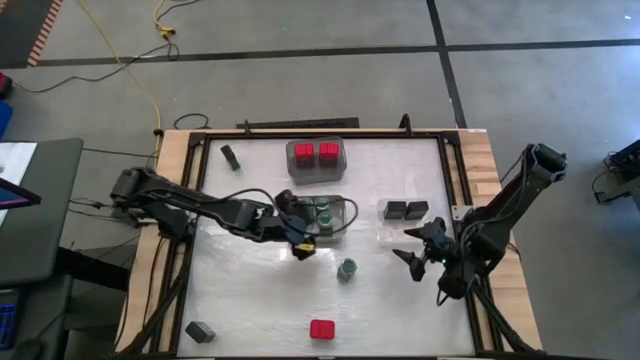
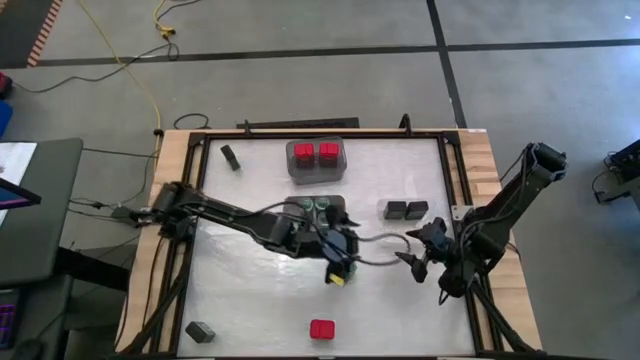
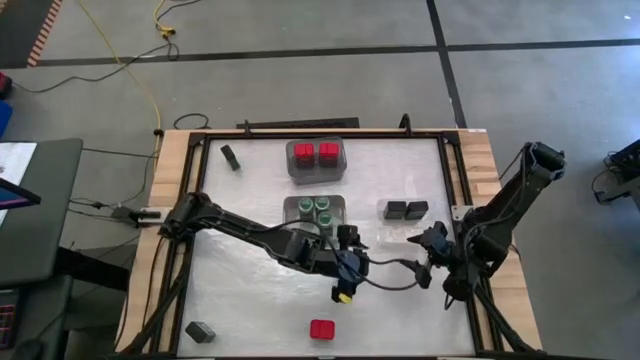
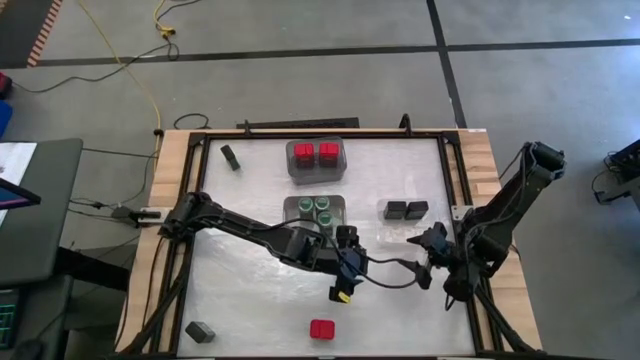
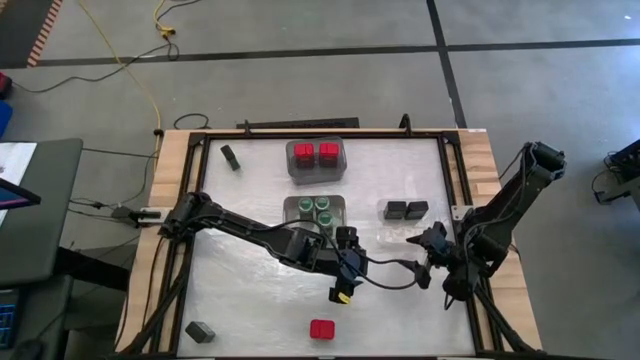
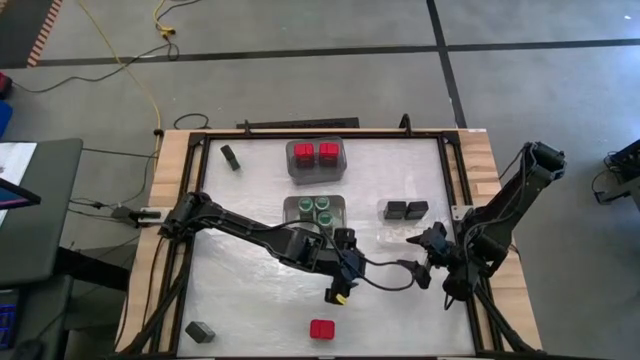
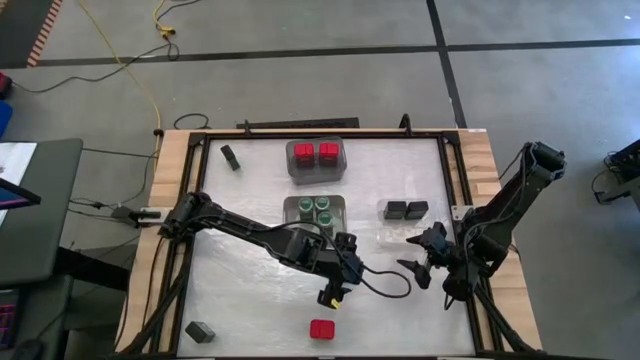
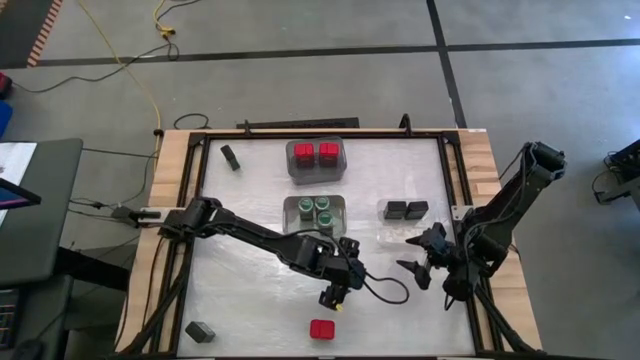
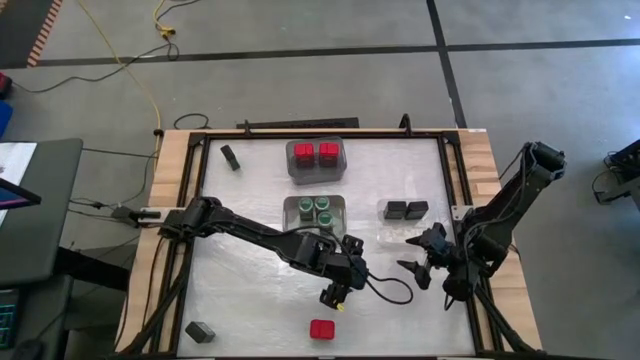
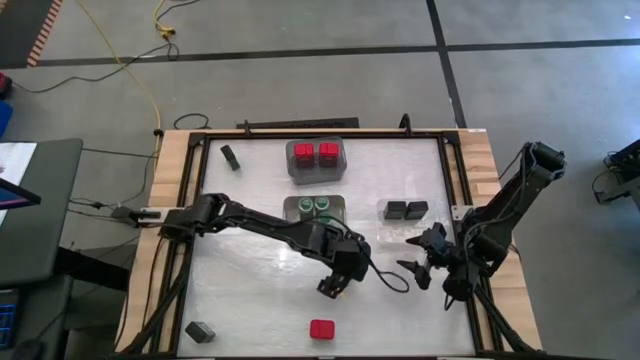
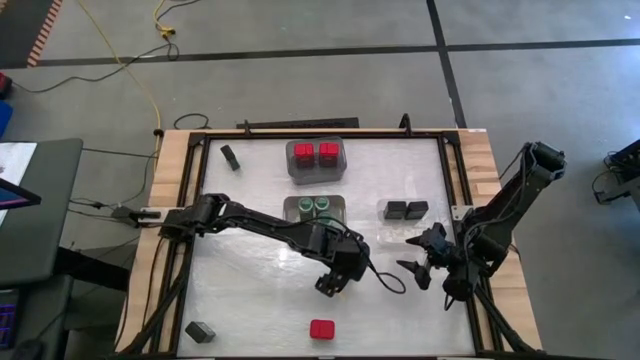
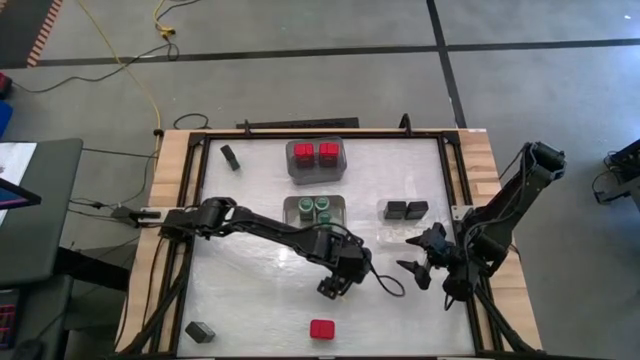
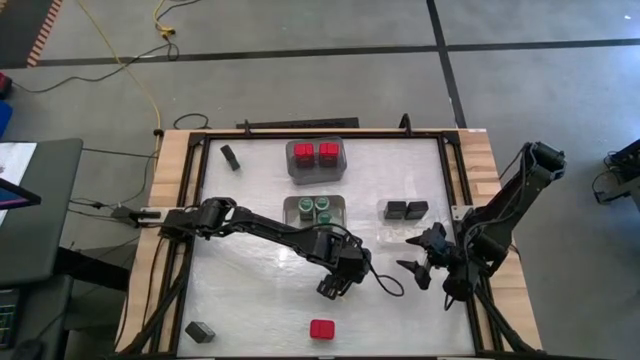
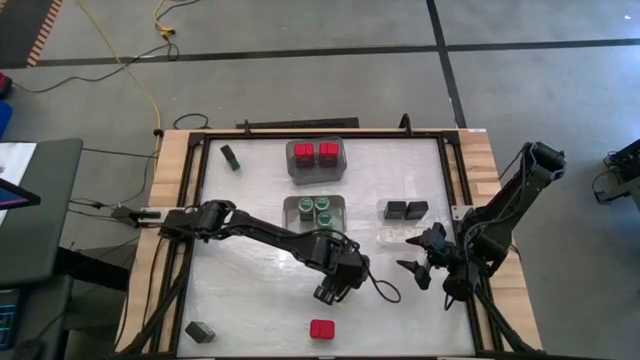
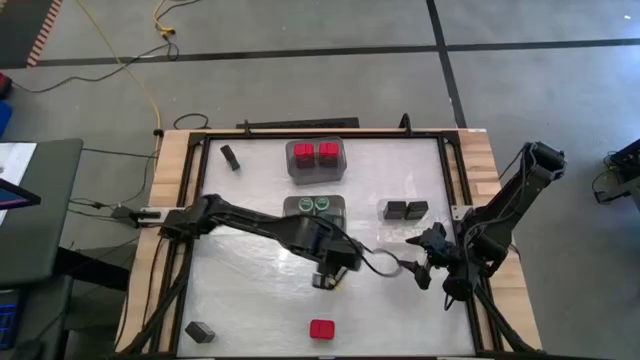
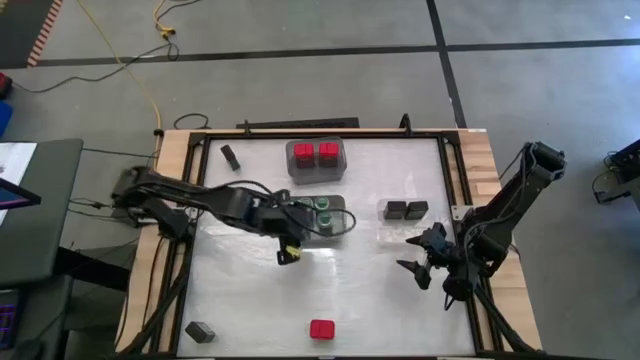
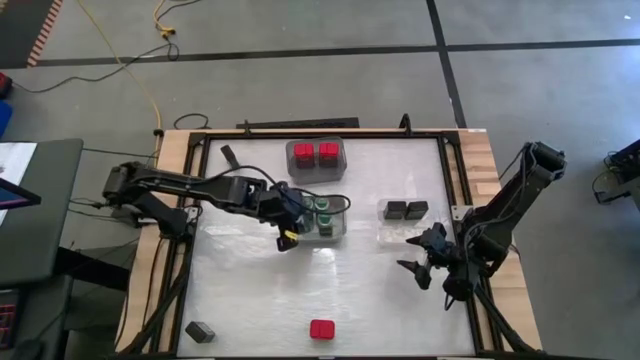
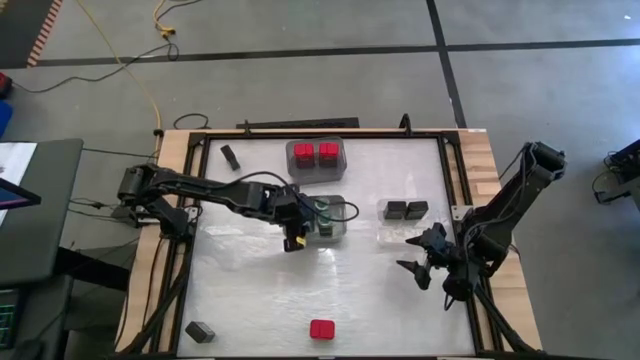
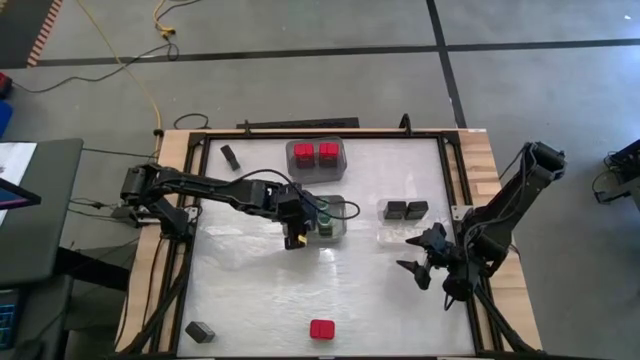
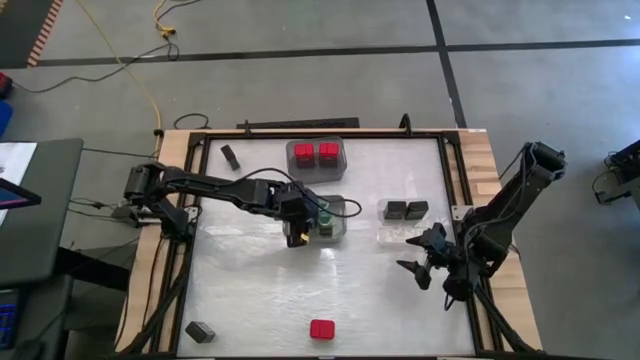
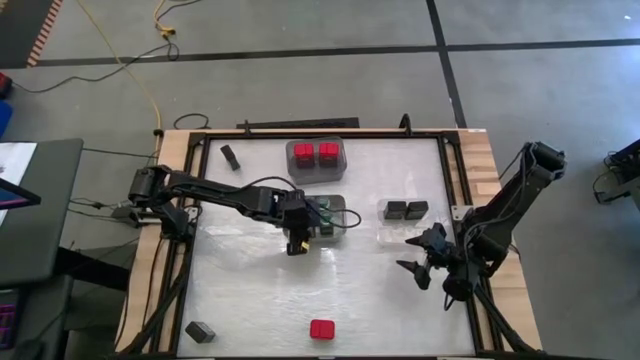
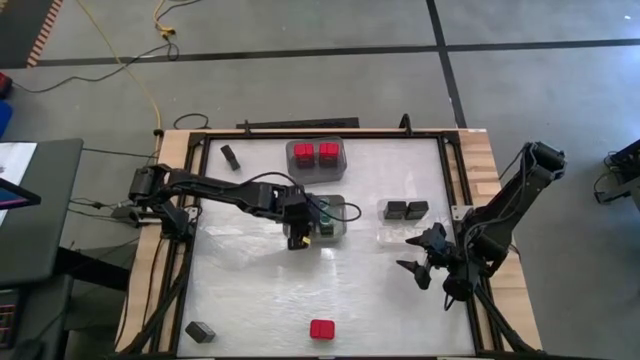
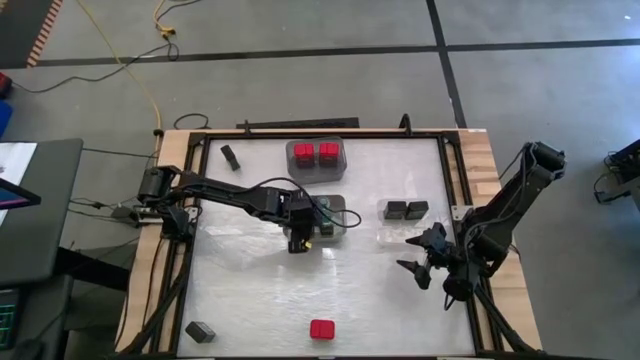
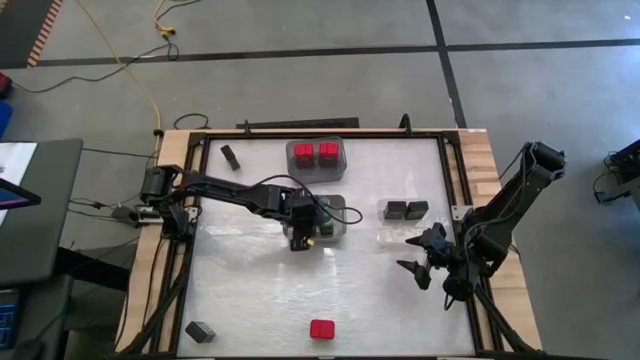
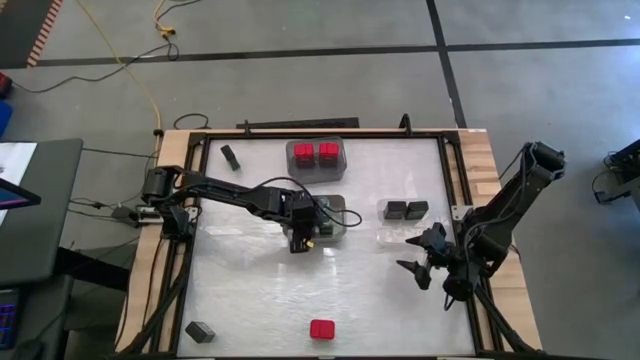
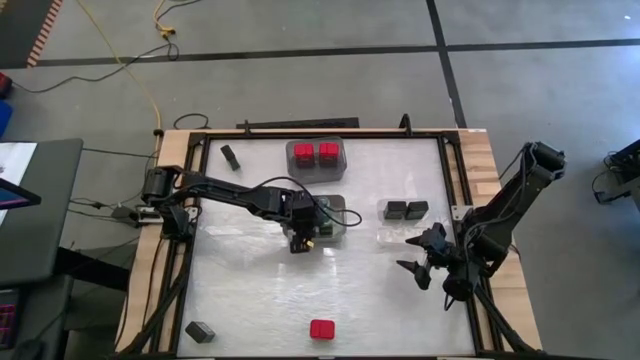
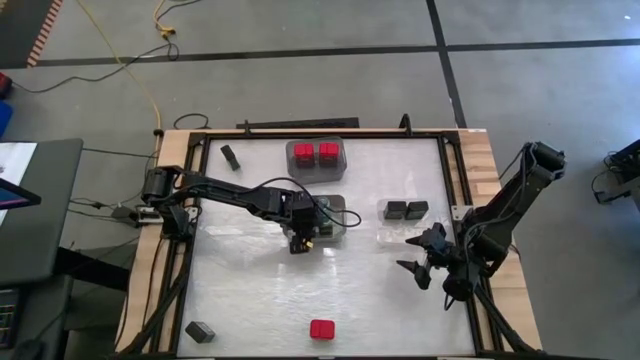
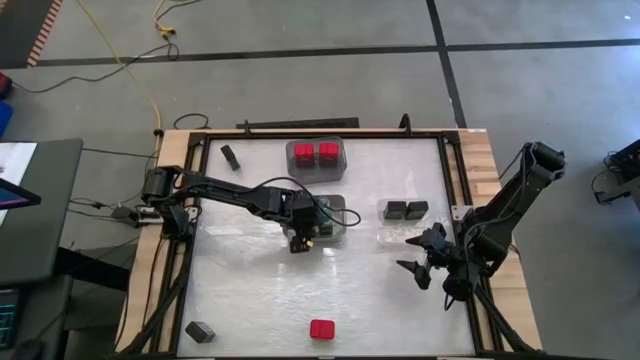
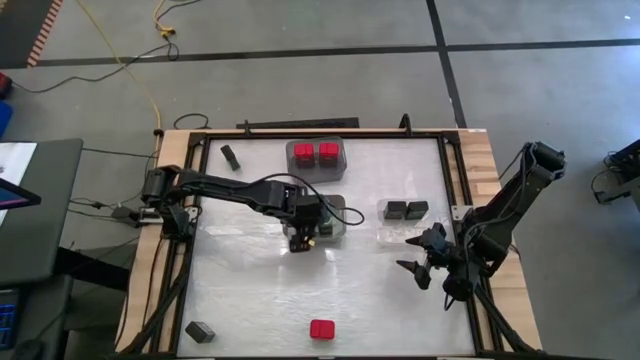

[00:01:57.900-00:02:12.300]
Task: Sort spices by type
Put the green spice bottle into the gray bin

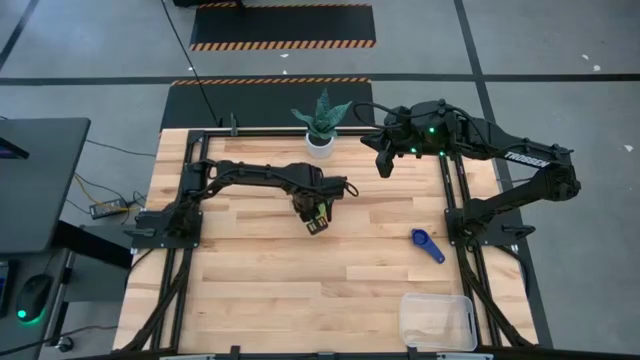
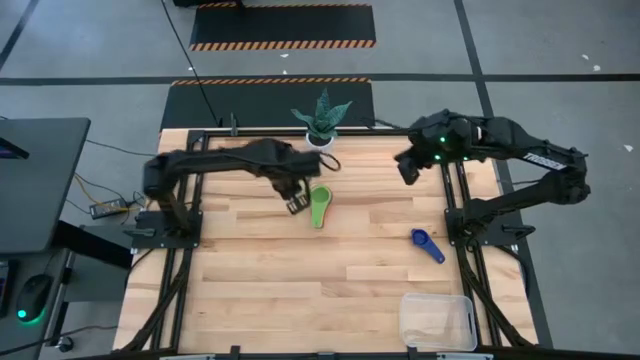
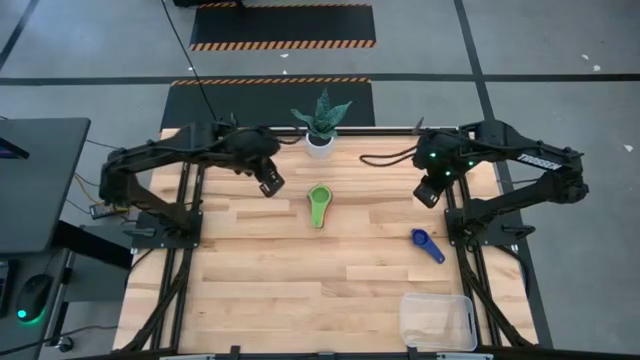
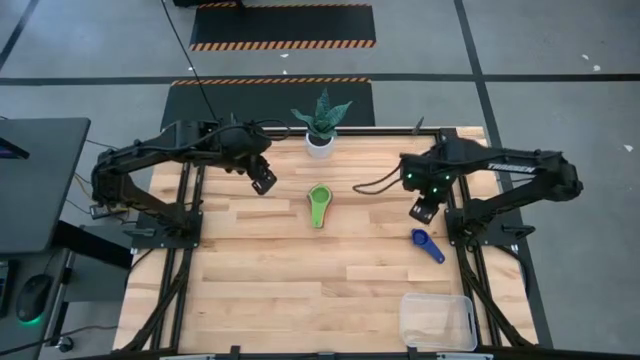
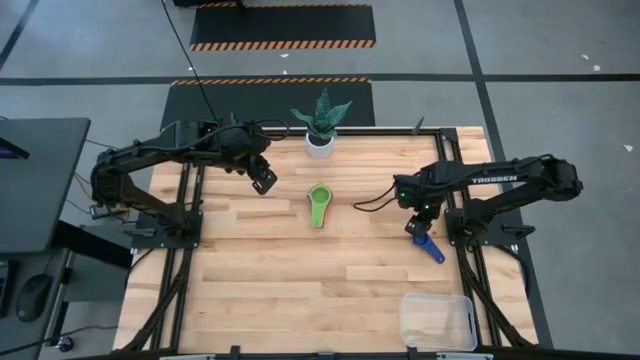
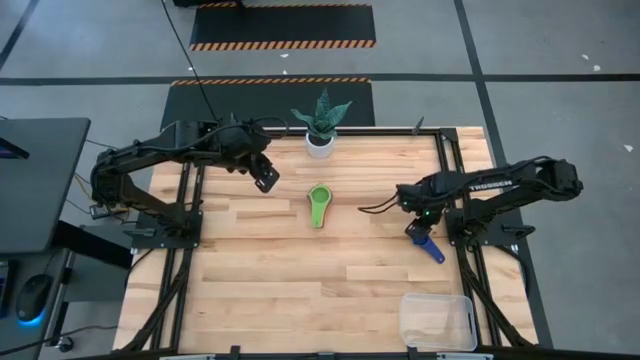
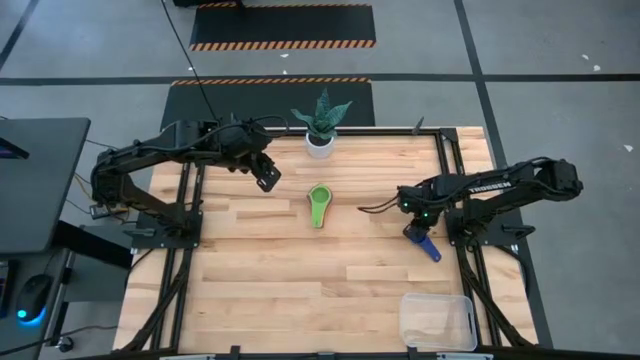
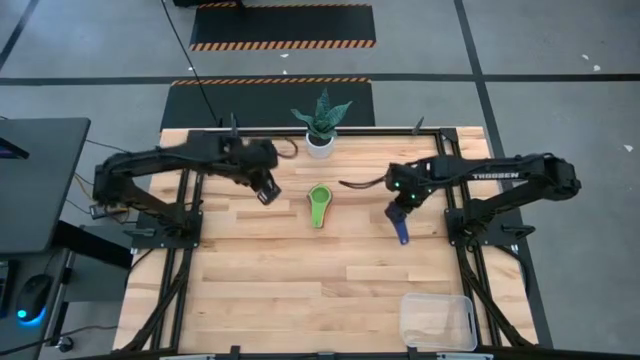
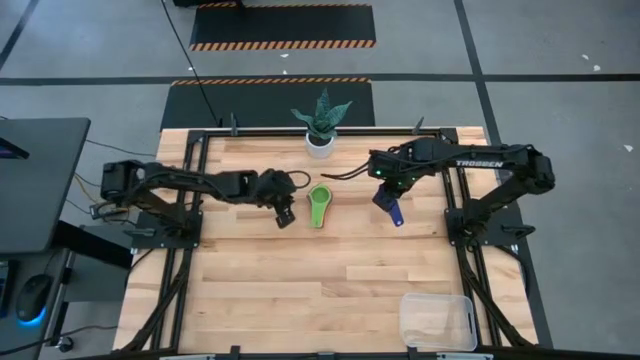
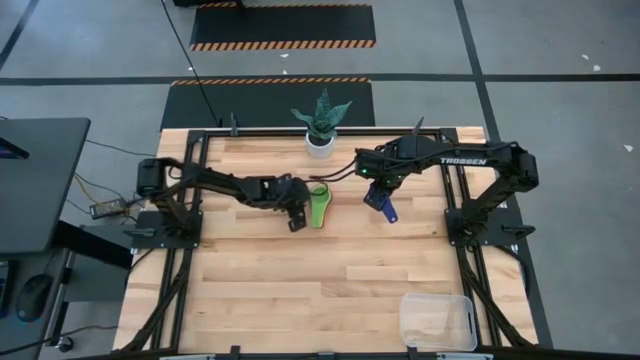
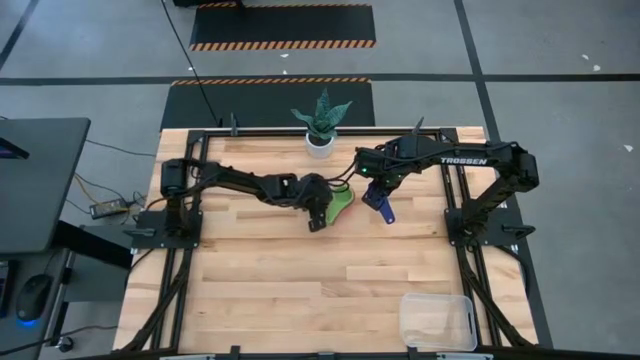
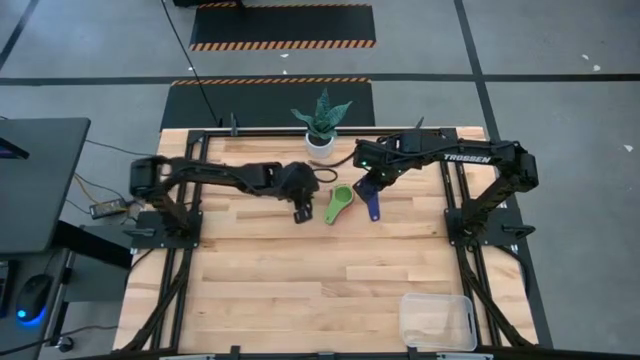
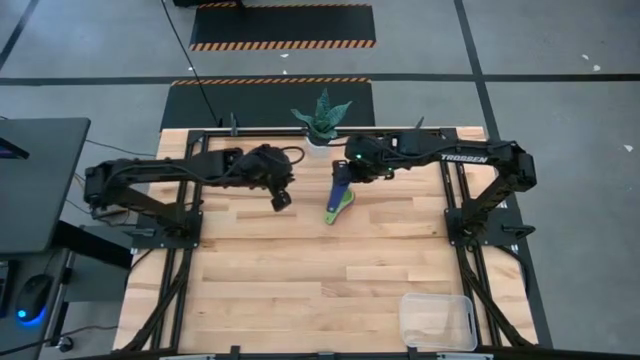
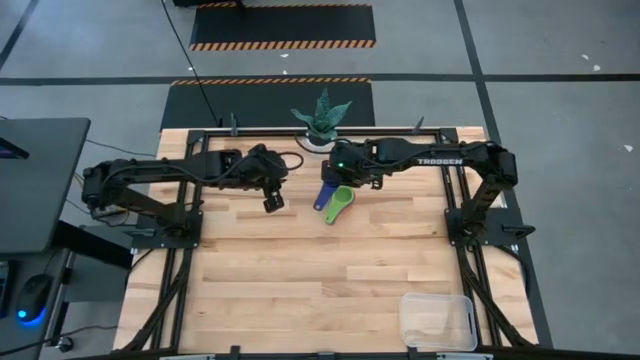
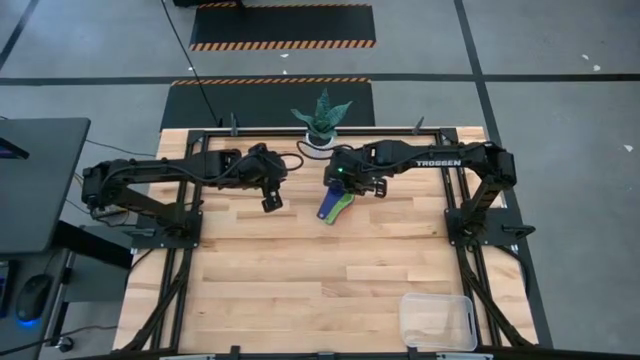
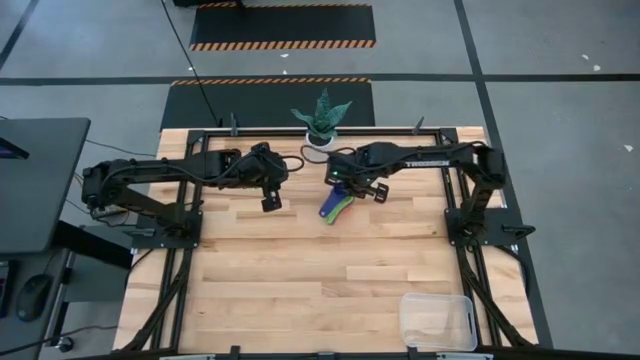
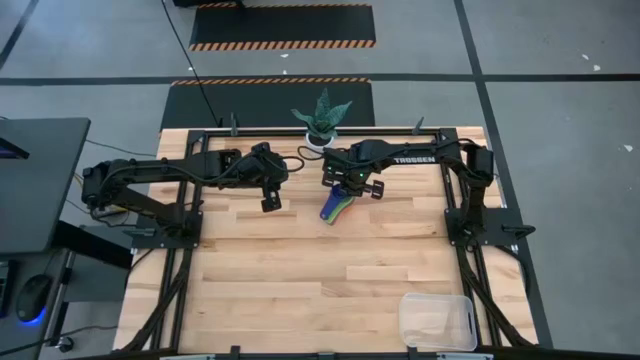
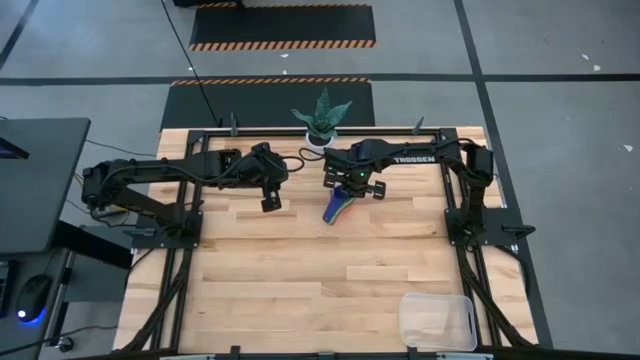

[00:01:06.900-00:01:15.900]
Task: Nest measuring cups in basket
Stack the dark blue measuring cup on top of the green measuring cup
